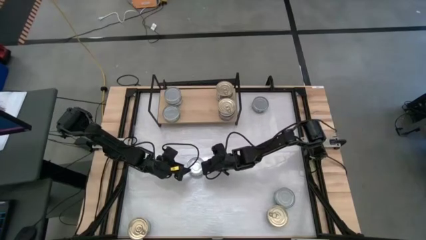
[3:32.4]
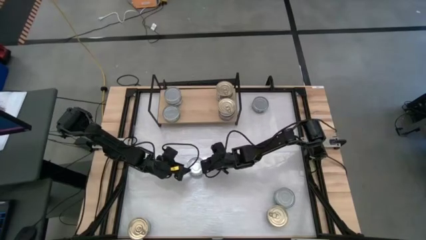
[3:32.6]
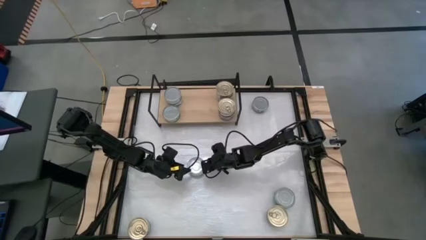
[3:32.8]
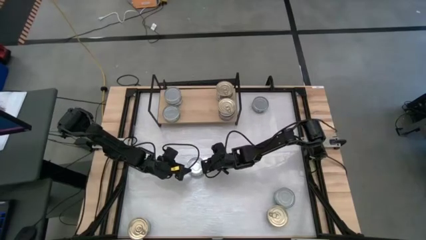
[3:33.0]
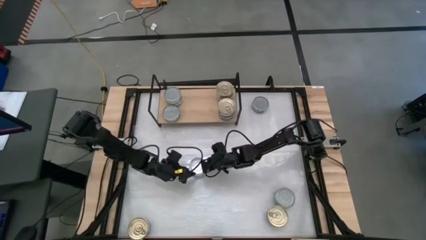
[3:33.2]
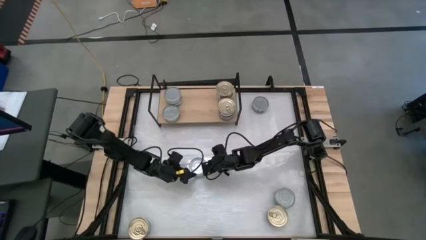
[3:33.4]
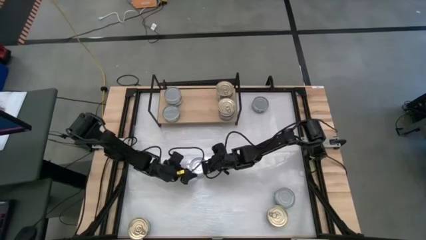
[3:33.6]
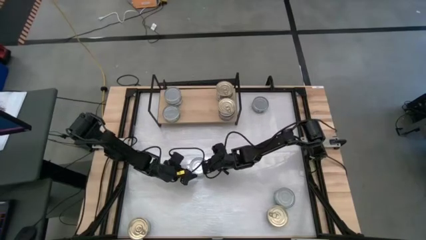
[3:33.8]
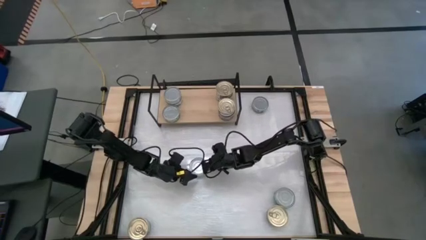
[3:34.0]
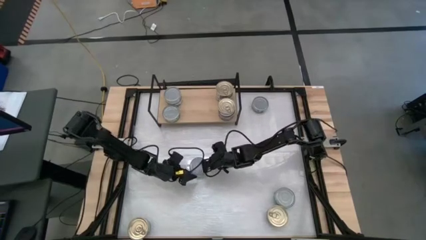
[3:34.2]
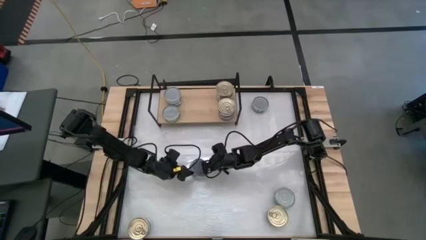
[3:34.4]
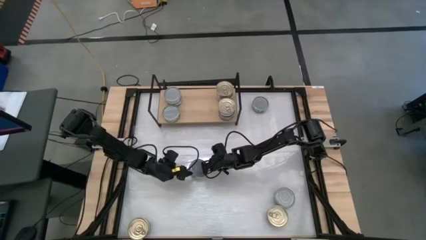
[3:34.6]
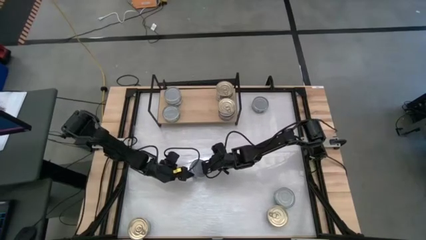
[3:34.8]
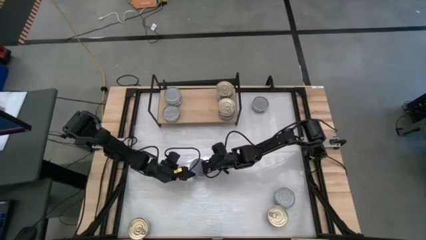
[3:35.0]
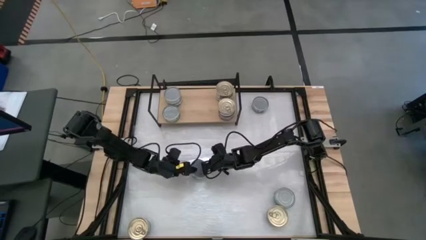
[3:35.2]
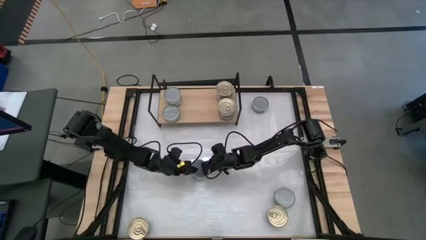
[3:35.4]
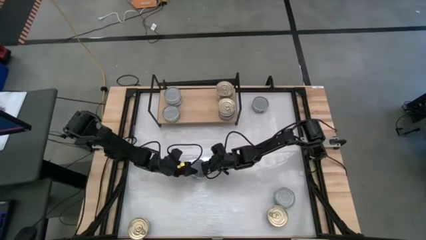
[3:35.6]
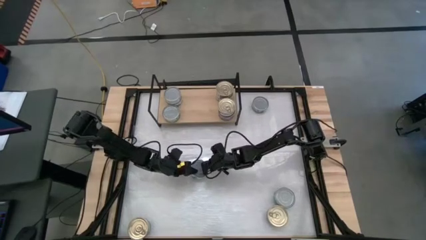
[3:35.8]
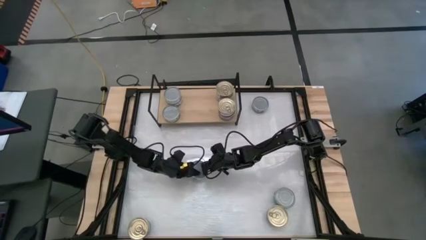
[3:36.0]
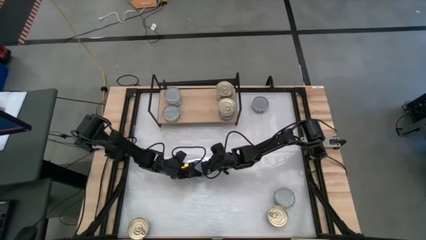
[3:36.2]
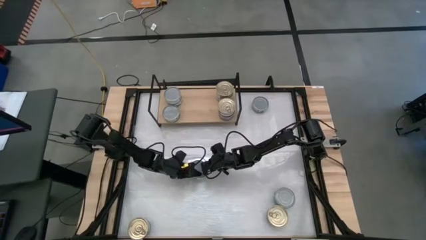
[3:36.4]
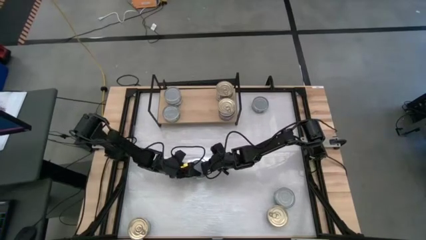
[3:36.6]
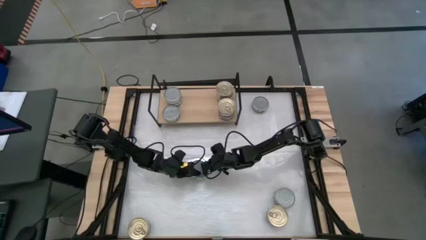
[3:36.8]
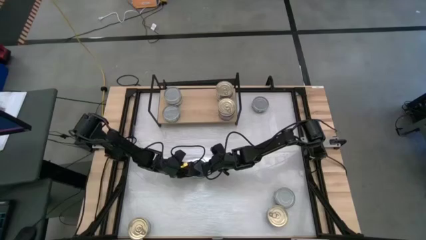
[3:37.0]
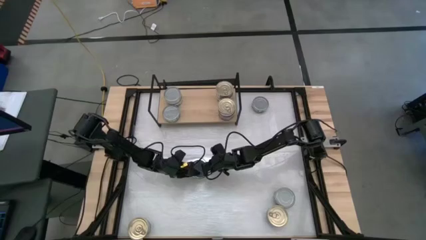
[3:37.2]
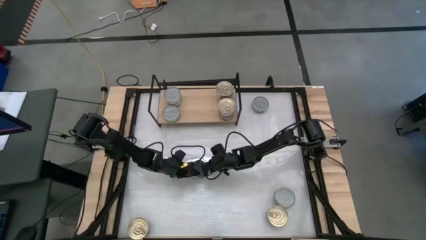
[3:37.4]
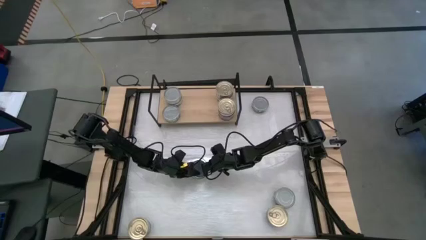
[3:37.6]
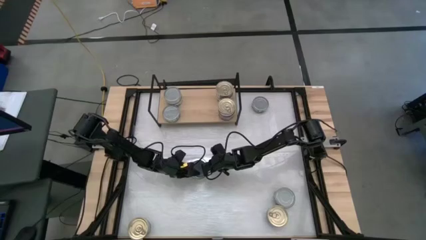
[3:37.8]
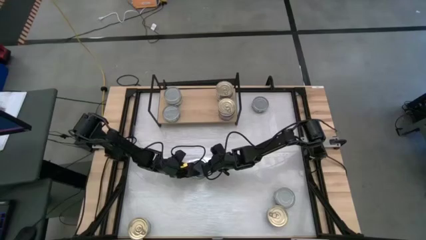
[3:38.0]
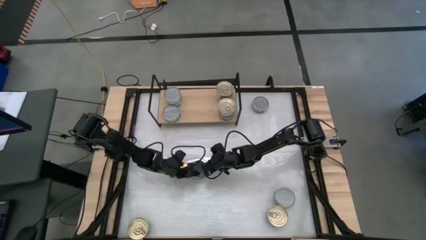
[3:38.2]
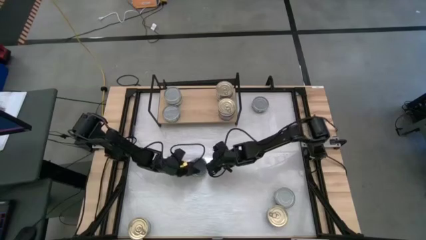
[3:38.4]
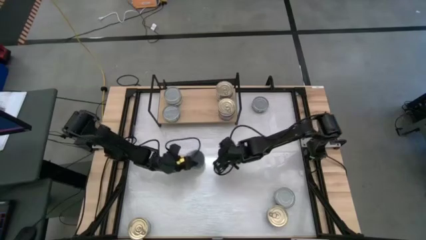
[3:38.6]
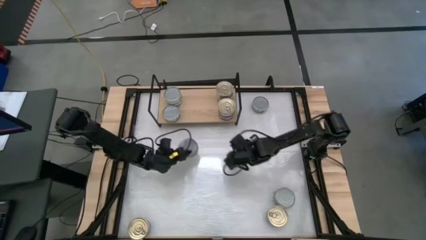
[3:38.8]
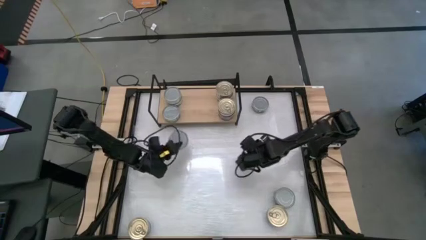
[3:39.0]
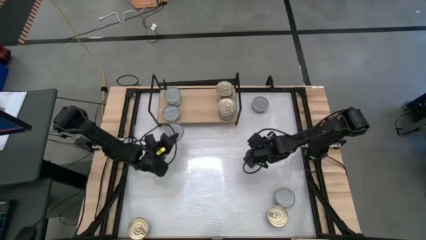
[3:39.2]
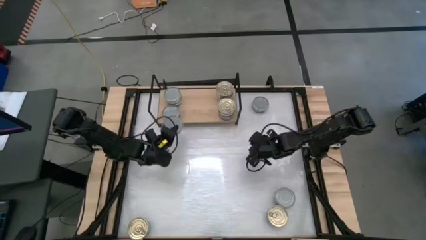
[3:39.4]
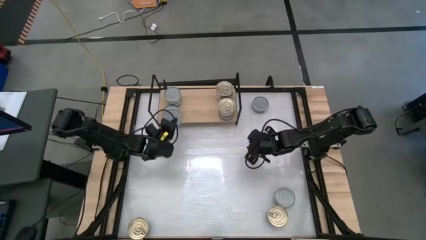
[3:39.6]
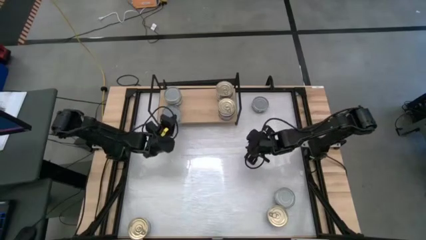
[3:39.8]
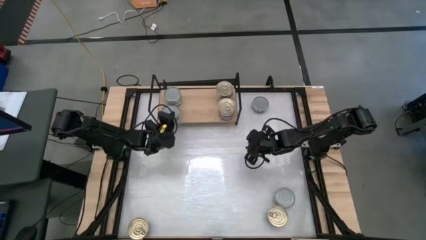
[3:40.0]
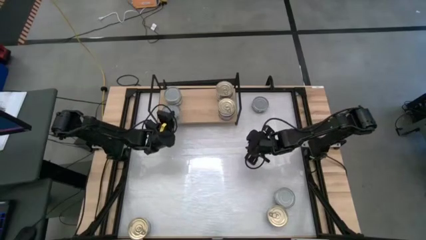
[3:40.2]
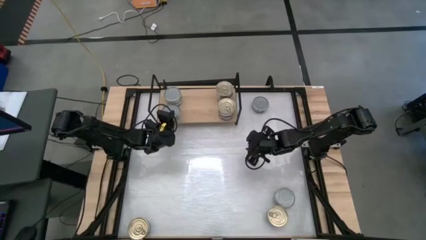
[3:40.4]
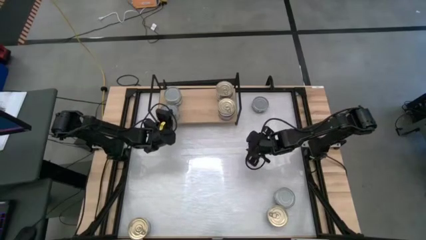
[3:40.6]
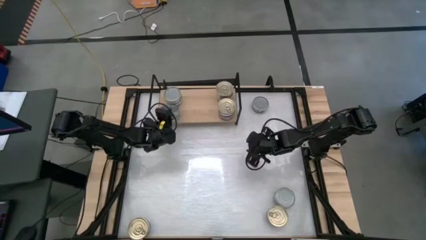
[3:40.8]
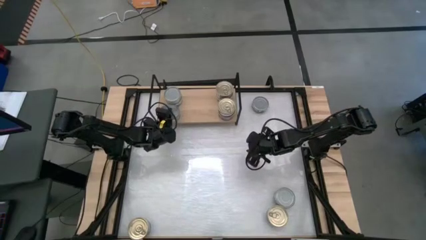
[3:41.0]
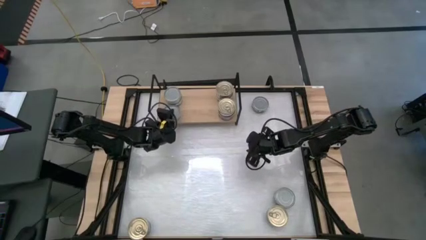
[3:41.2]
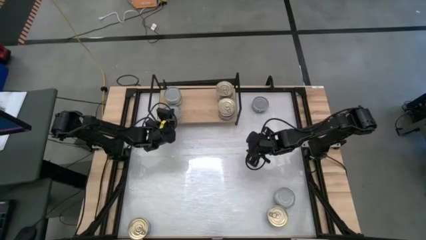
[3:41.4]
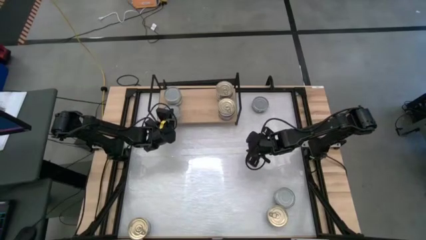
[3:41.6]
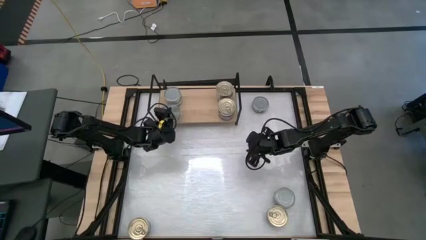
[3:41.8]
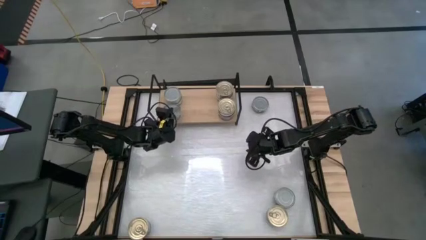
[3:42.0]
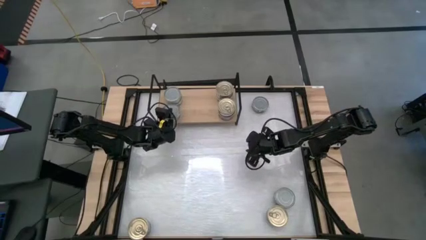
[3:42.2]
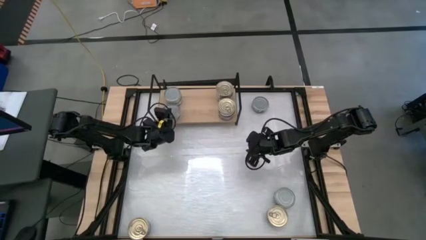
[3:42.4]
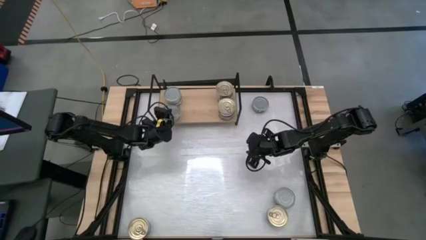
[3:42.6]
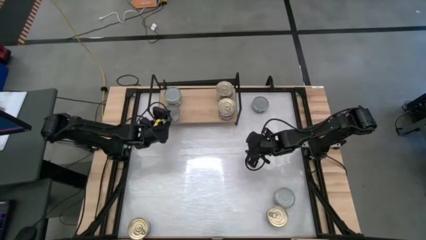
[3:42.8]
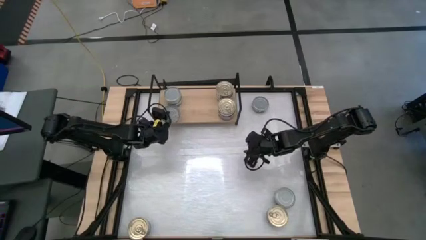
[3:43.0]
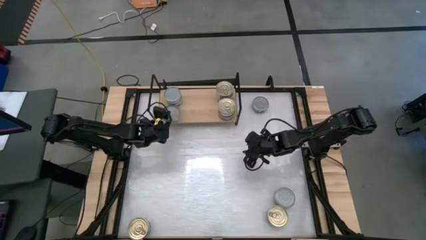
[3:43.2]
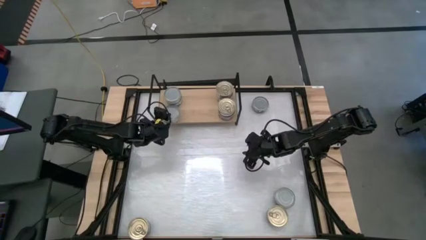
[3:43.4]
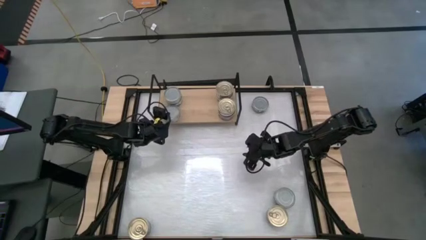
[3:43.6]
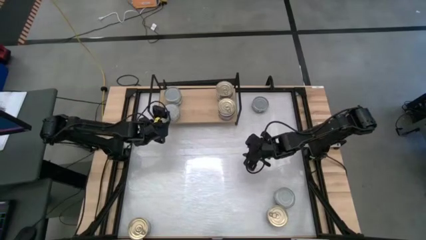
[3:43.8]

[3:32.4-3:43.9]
Task: Stack canned seafood by type on shelf
Stack the green tuna can on top of the green tuna can on the shelf

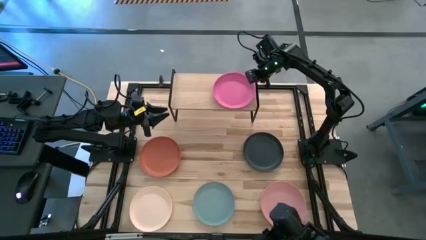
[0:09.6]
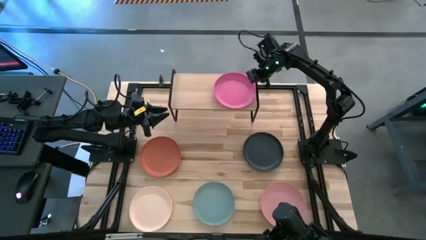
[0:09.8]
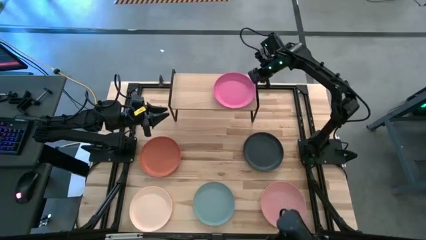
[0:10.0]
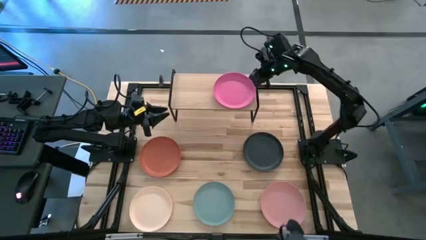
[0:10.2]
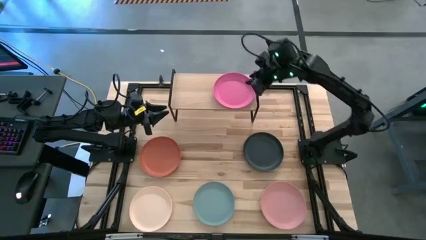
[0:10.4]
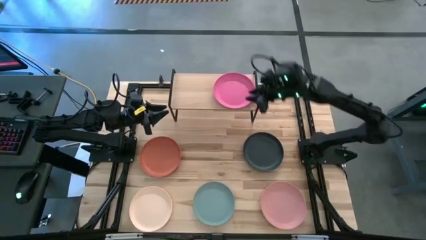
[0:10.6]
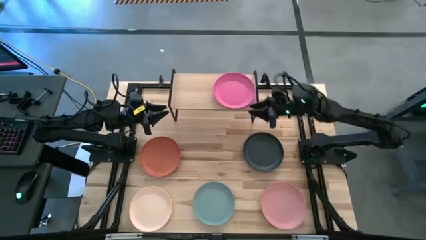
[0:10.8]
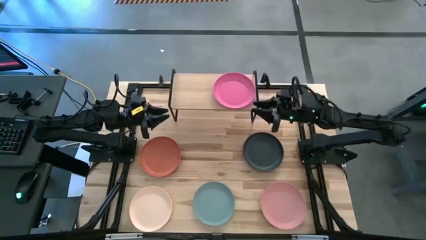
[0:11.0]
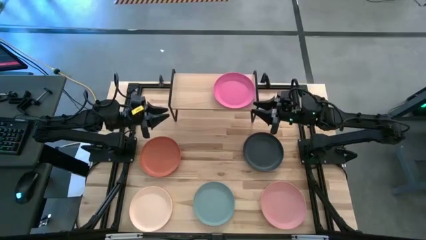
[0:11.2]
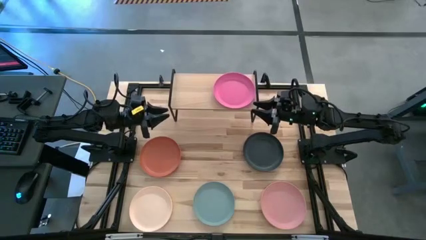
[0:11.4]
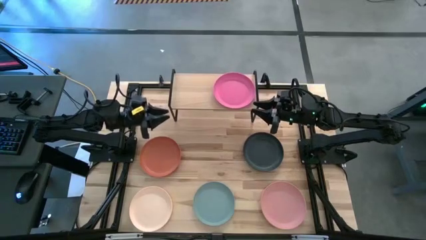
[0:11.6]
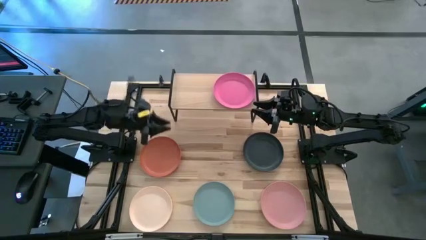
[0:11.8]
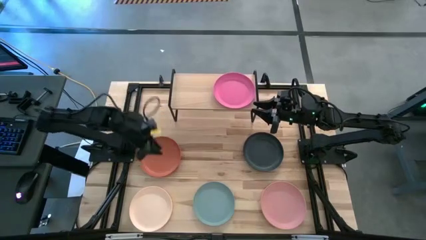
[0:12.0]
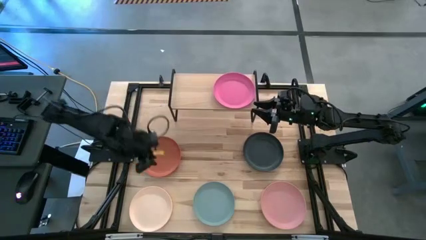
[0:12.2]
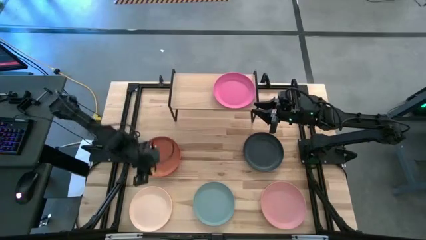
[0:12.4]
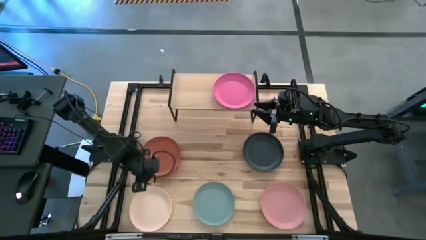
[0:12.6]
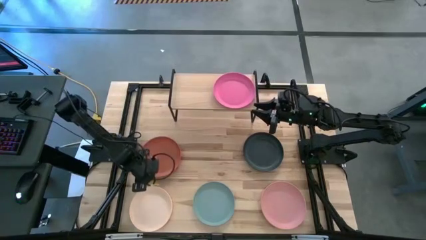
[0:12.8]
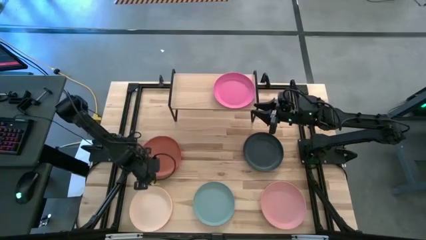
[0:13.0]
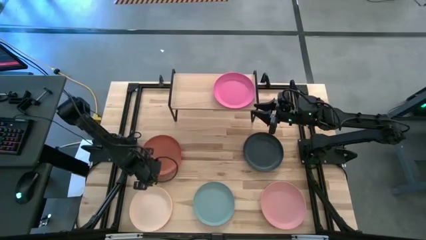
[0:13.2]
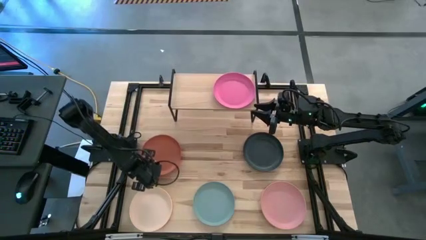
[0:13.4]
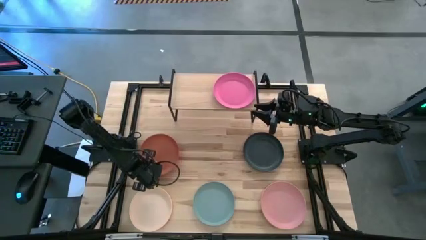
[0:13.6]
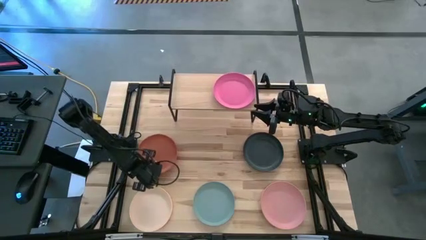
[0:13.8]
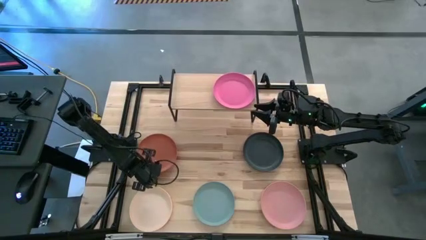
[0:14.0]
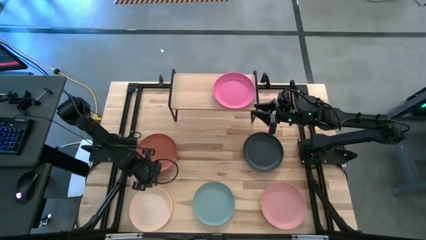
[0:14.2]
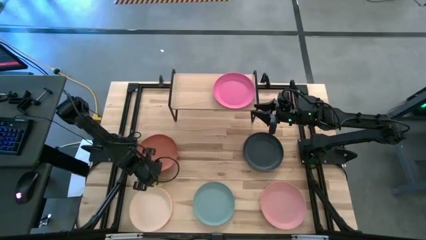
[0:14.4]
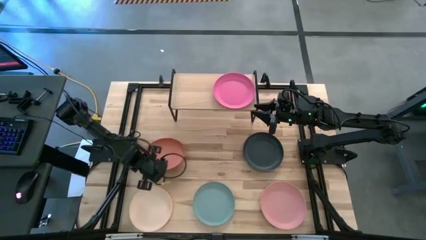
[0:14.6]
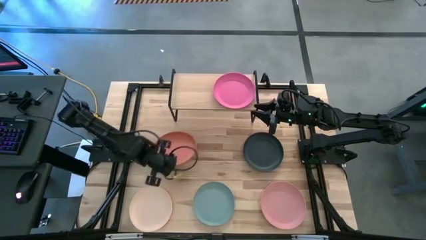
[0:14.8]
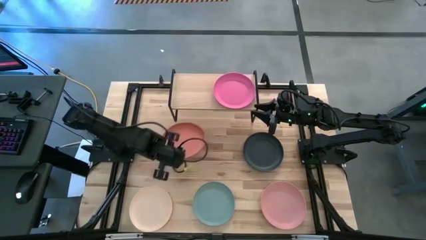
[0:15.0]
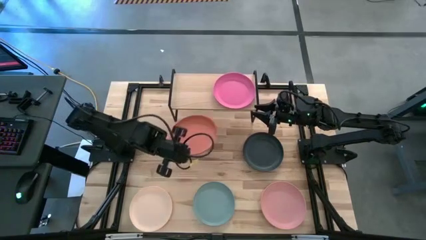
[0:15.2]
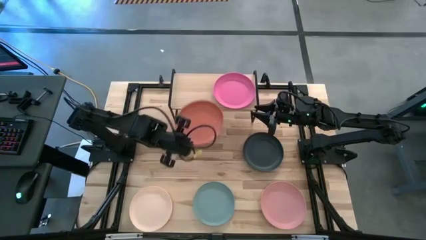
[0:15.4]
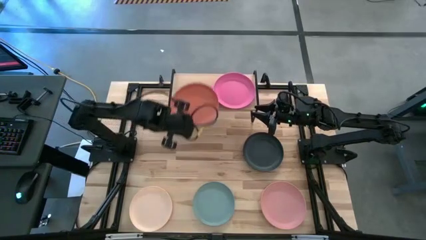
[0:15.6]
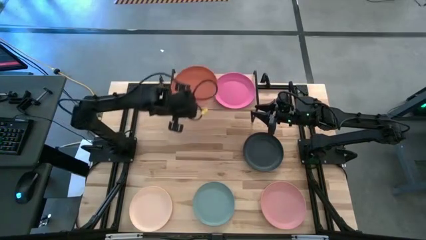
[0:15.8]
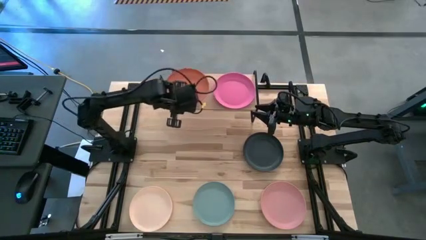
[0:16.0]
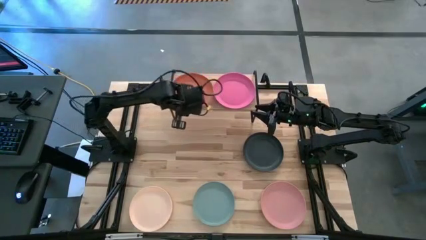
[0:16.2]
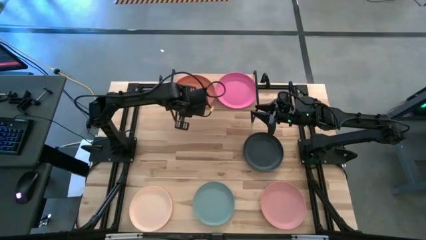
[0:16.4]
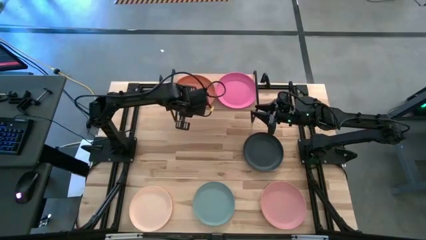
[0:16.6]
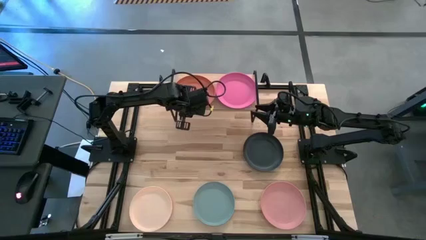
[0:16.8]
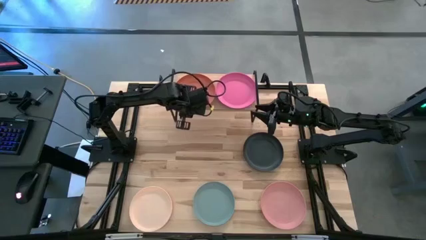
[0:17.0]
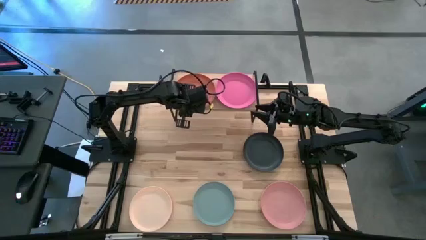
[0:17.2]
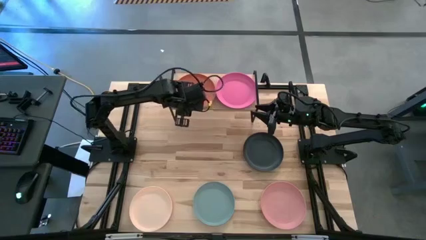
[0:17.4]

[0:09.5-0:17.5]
Task: Place and stack plates onto a shelf
Put the orange plate on the shelf
